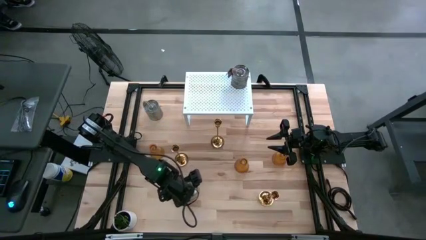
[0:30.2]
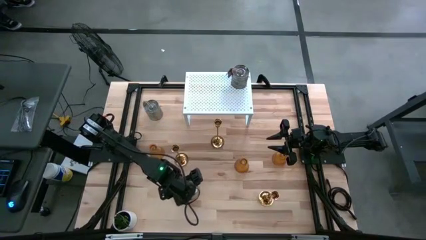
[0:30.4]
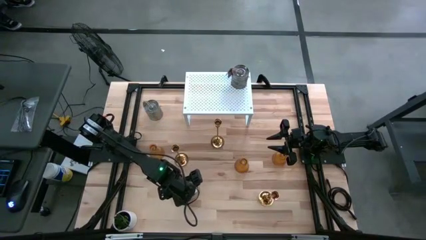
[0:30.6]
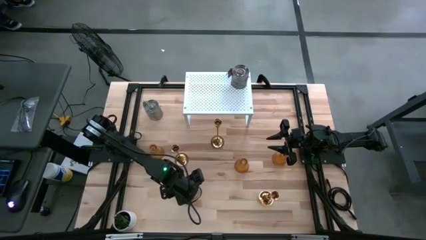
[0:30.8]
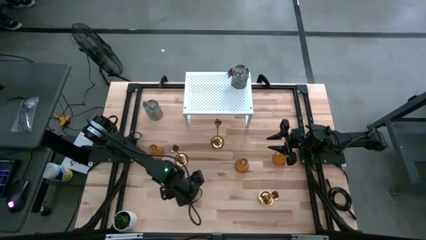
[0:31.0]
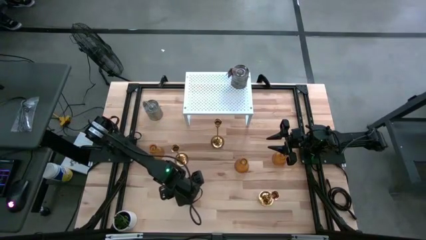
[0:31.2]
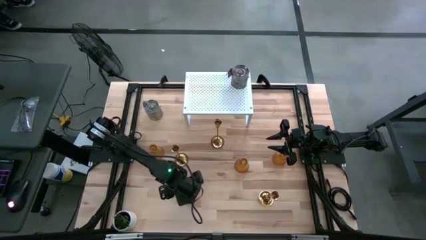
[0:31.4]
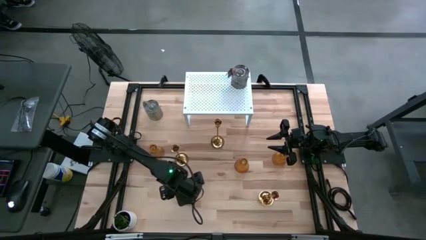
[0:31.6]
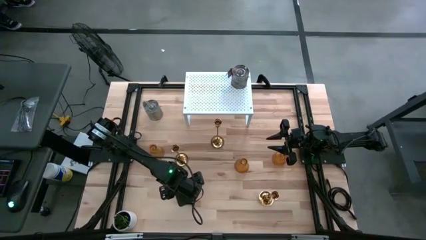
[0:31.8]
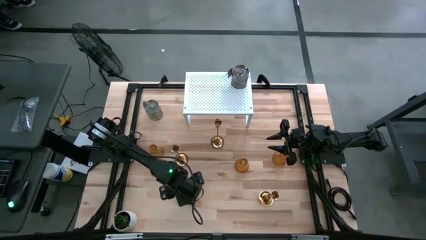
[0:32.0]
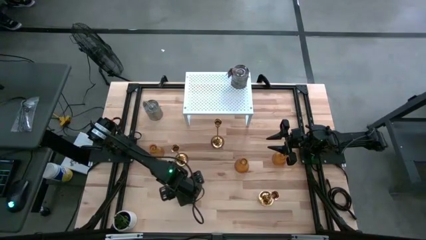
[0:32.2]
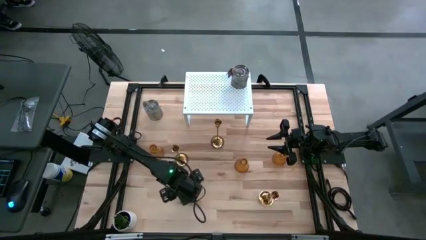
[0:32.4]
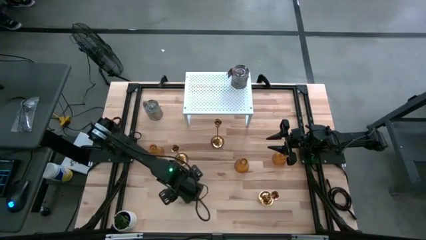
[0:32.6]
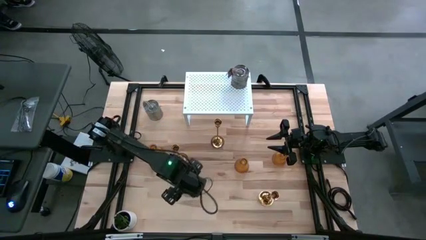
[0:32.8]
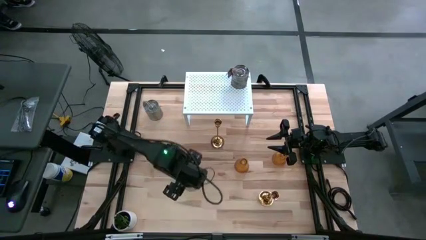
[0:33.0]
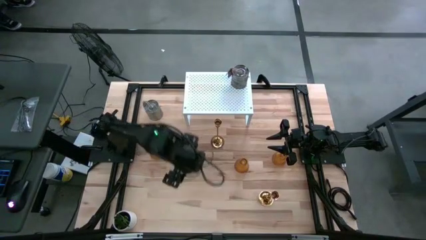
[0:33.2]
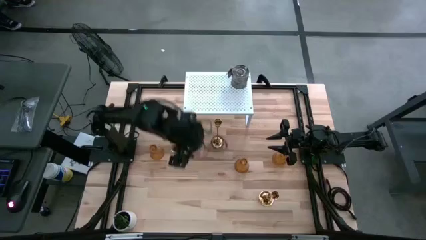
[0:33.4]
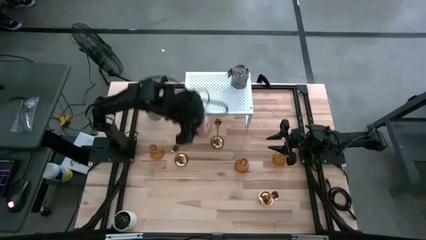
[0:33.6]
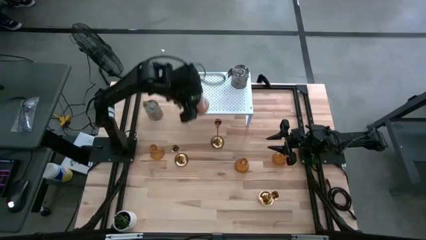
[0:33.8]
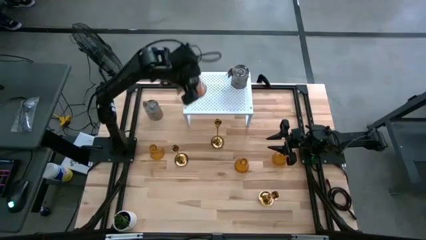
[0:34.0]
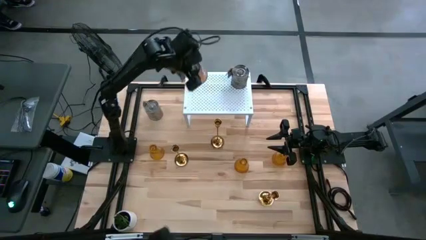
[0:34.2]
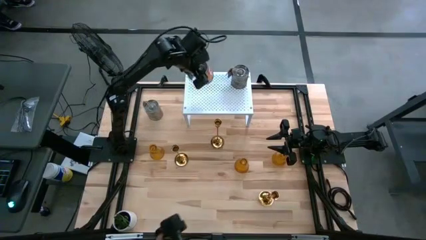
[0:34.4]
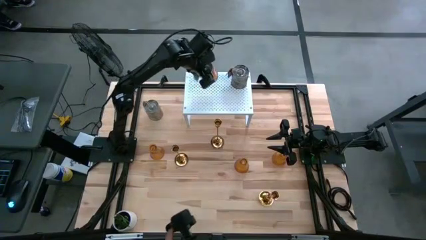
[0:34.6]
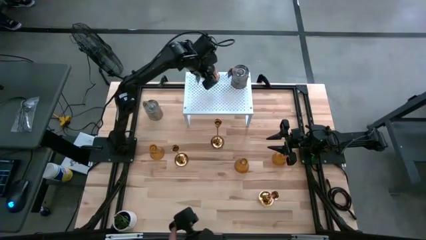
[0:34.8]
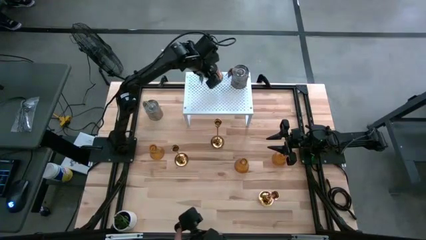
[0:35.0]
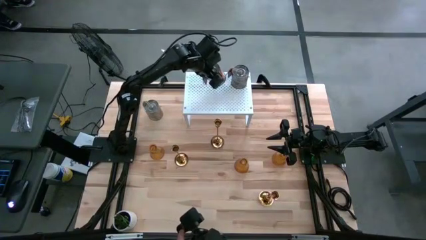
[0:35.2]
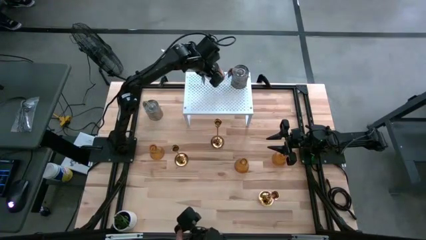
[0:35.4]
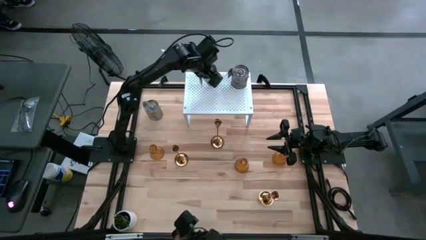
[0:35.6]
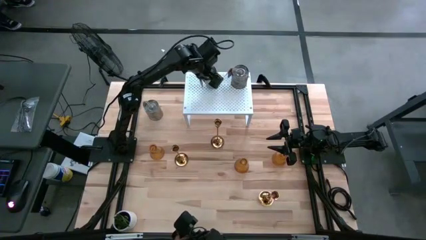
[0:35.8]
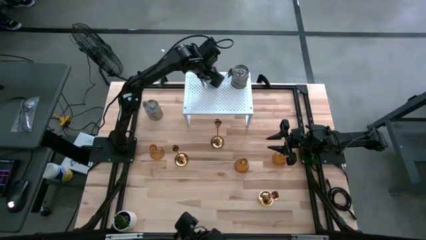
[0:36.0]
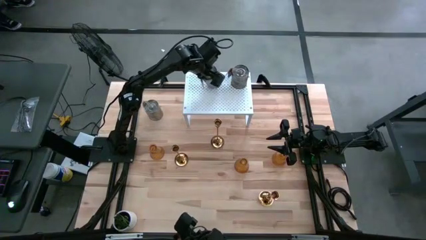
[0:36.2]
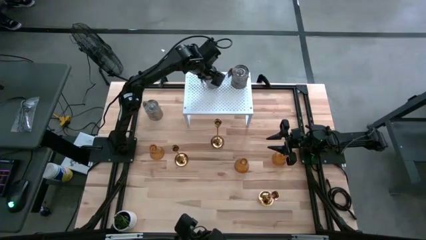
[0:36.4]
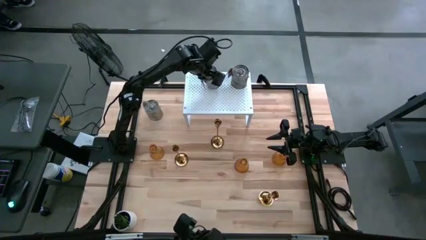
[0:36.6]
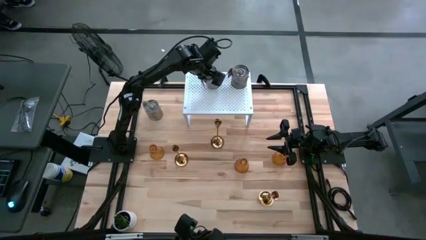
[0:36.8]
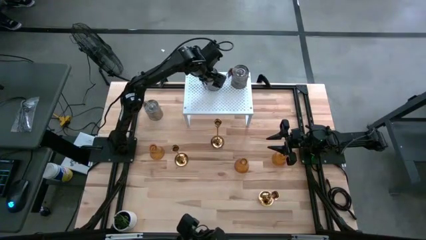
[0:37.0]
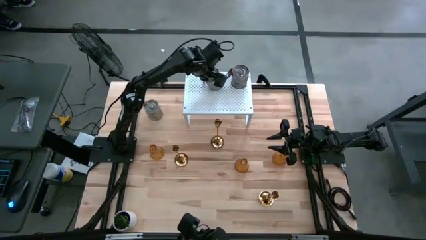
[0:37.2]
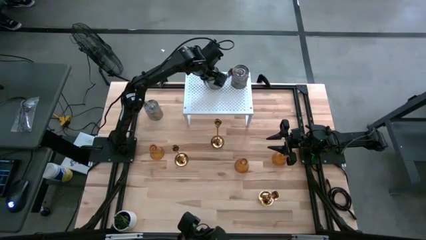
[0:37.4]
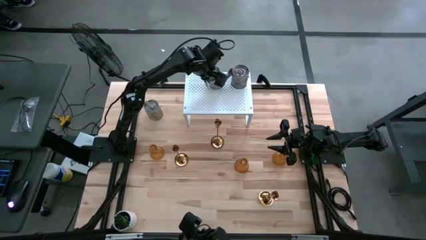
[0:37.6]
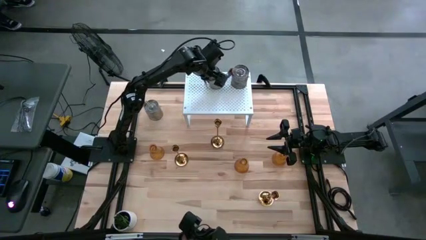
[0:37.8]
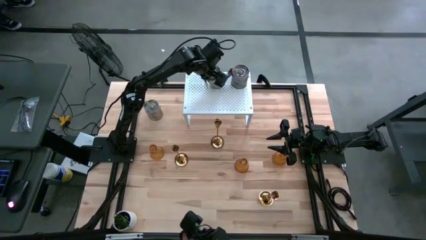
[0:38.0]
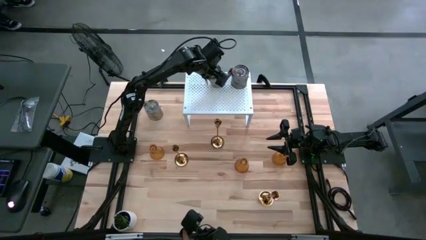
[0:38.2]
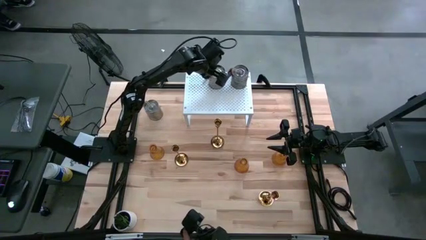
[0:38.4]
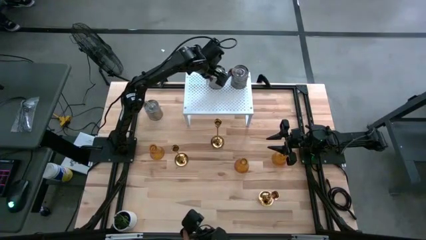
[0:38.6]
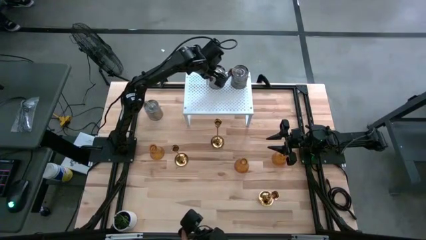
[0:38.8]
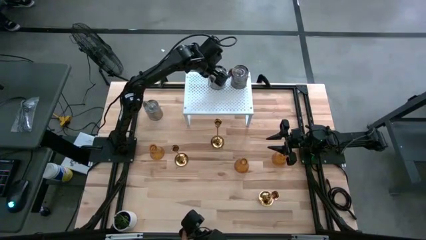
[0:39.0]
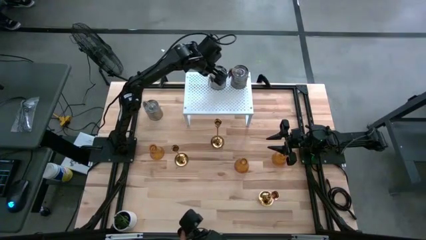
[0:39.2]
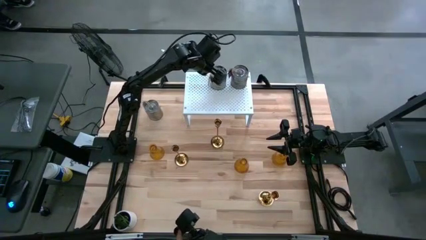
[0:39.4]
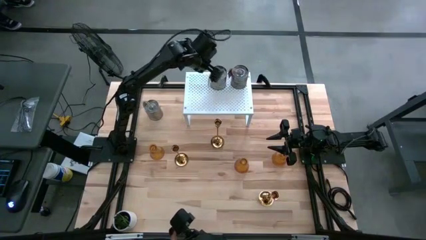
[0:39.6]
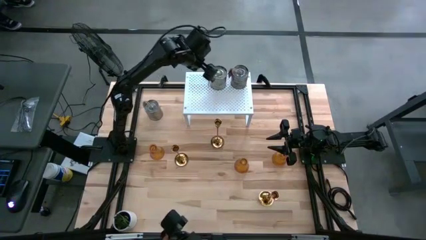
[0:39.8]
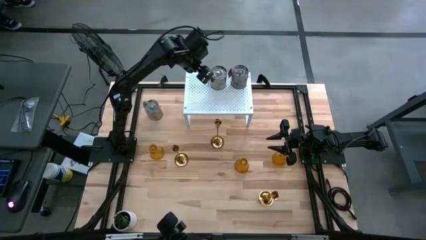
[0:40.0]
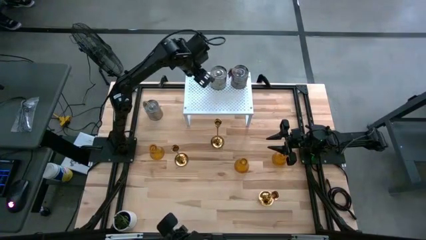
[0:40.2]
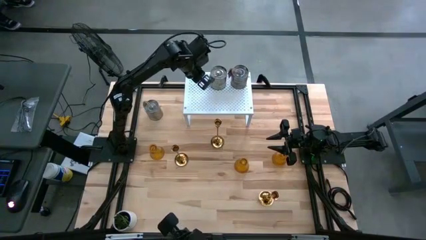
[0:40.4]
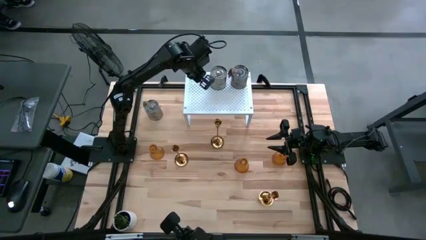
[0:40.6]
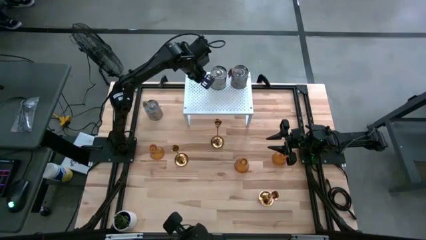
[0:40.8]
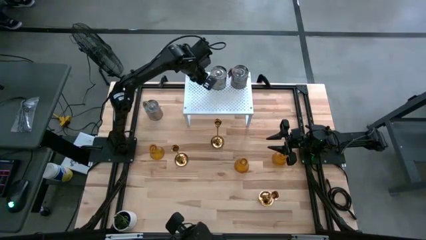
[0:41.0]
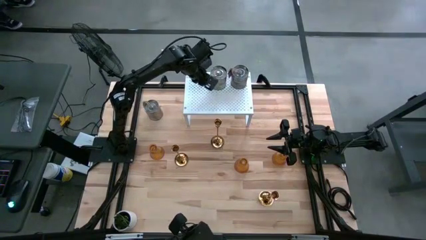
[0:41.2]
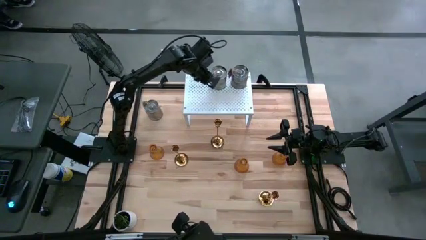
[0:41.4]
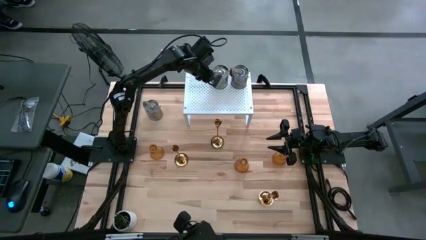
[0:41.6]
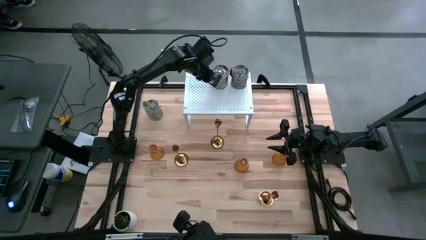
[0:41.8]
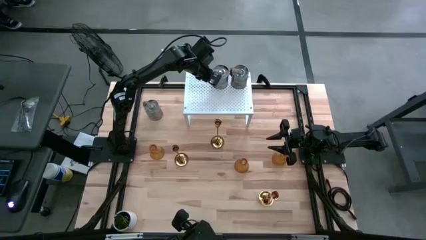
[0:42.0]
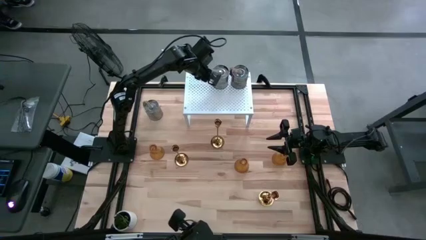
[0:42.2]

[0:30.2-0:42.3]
Task: Pick & Place candle stick holders
Put the bottom silver scented candle aligned with the other silver scented candle on the shelf

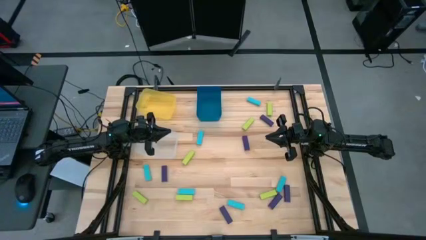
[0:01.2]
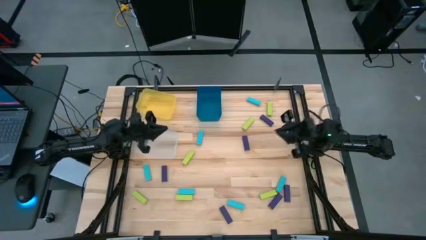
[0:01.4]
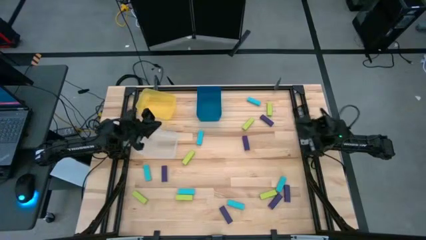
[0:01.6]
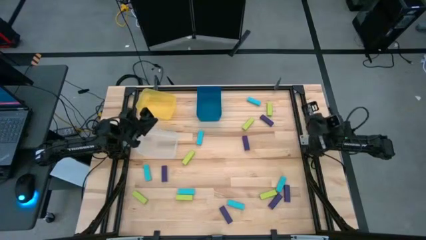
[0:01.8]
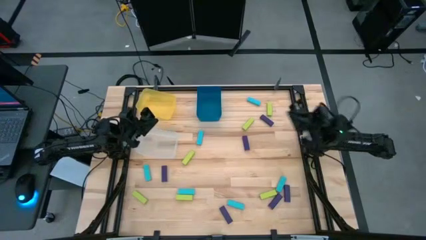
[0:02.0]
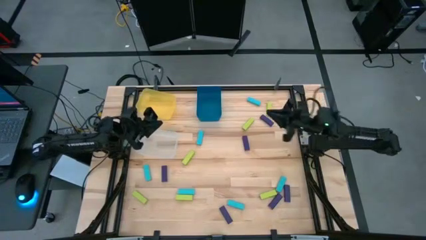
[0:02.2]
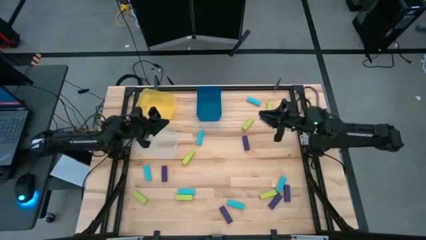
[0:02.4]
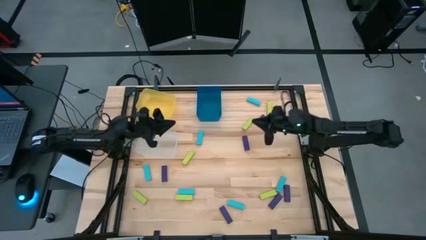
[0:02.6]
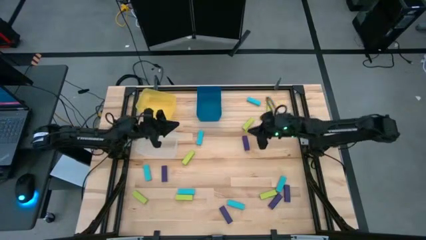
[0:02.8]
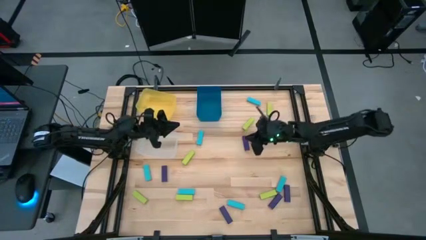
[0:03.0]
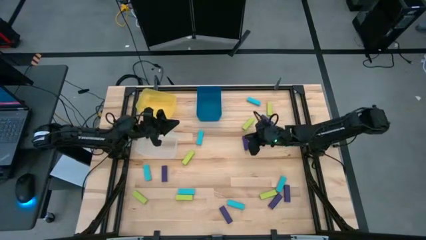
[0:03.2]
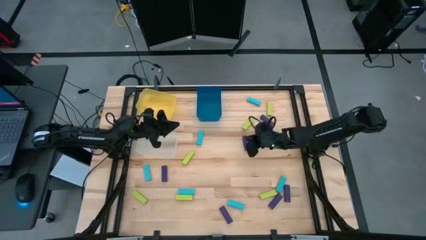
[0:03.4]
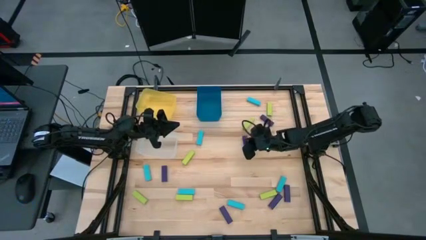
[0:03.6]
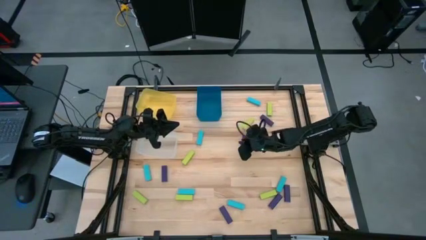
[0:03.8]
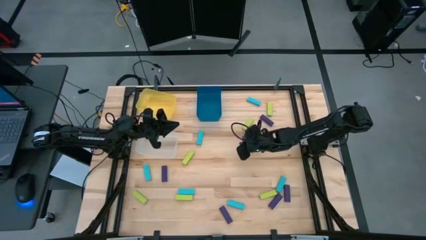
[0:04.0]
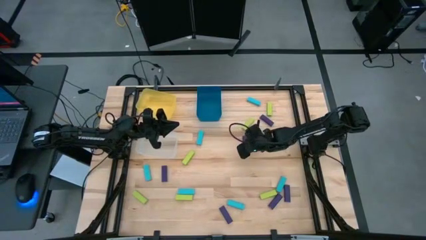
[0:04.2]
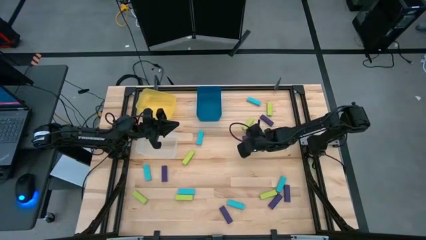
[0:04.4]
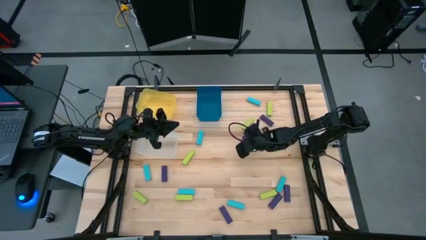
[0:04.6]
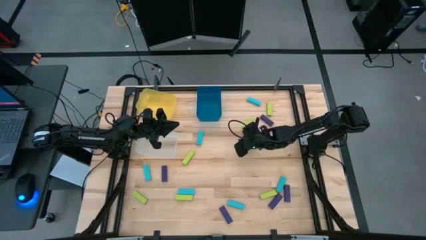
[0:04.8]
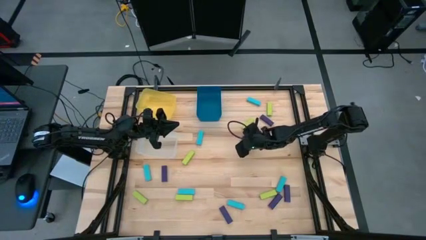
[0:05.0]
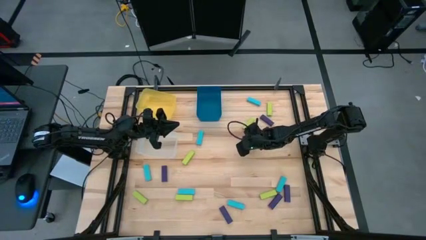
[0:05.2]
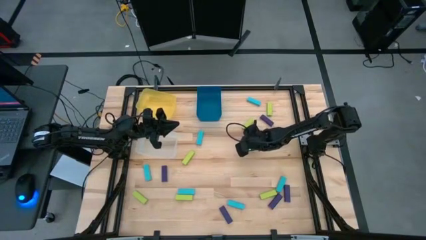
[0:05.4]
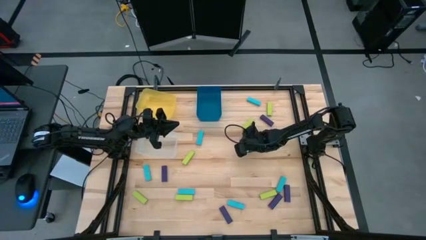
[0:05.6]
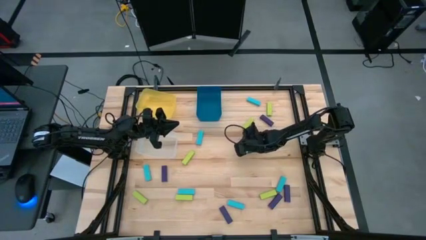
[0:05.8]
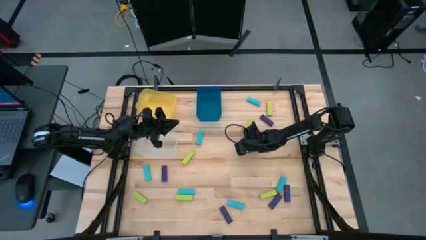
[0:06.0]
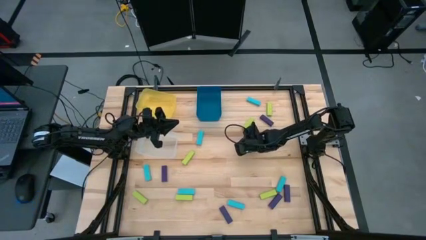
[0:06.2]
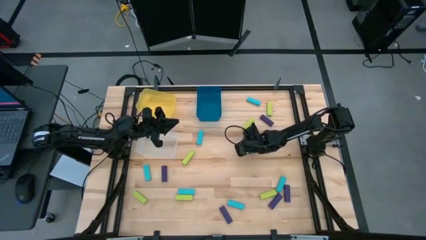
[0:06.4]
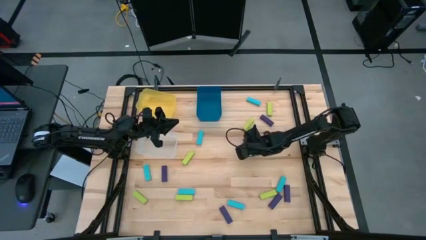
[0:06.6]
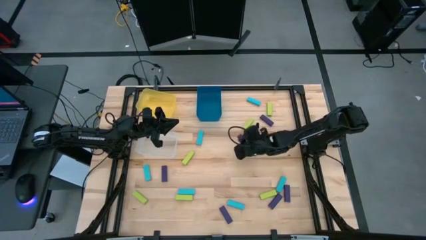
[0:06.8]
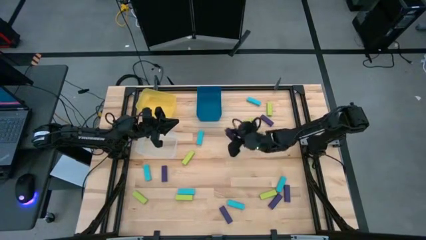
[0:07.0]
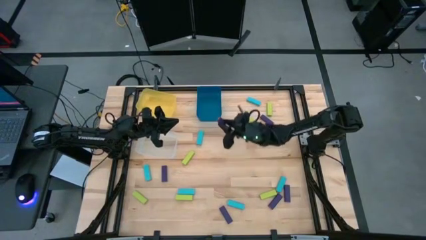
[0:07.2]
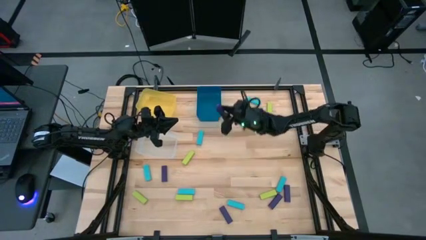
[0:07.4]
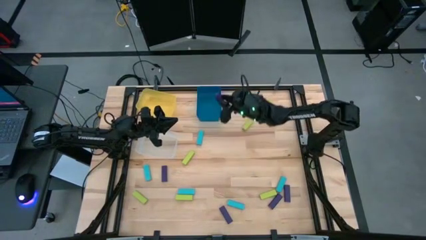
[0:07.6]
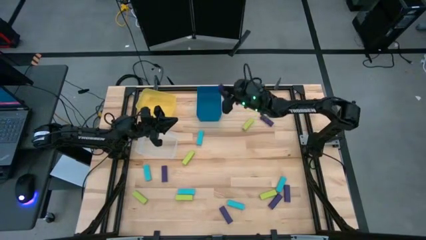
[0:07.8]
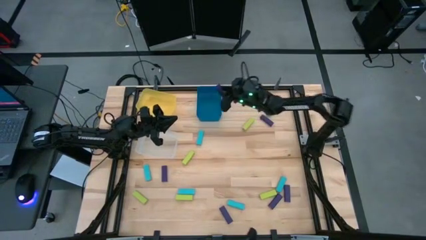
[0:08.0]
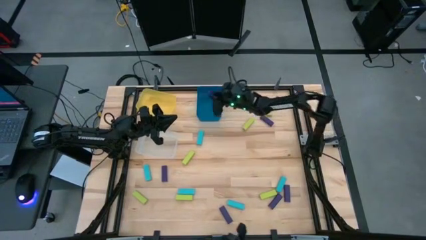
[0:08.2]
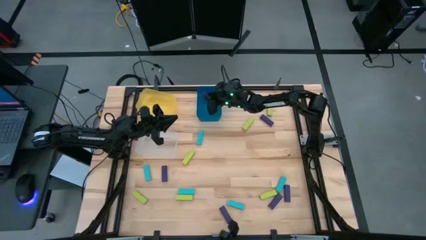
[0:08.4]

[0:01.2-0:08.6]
Task: Sort blocks
Put the purple block into the blue bin
